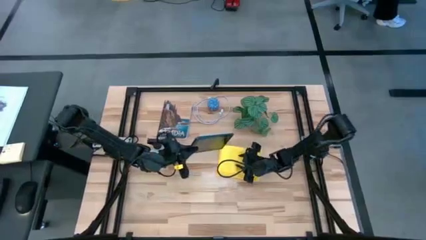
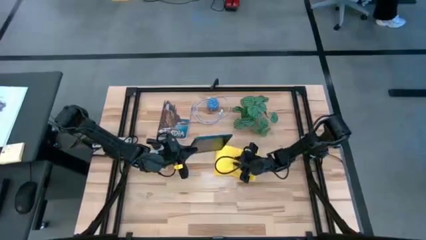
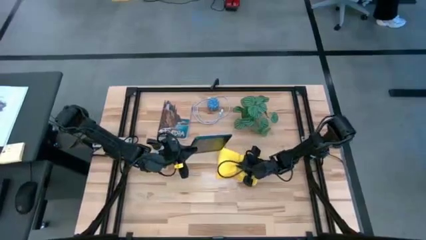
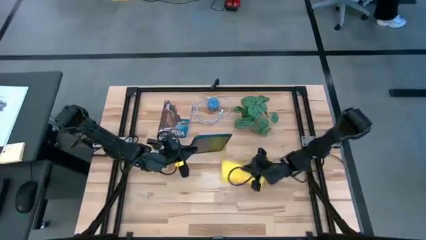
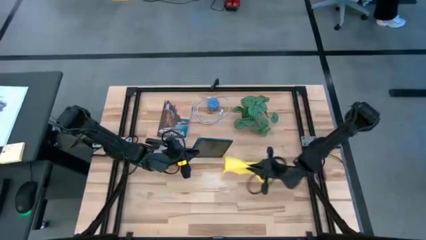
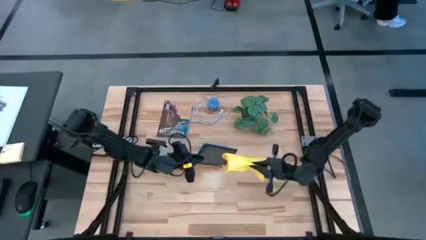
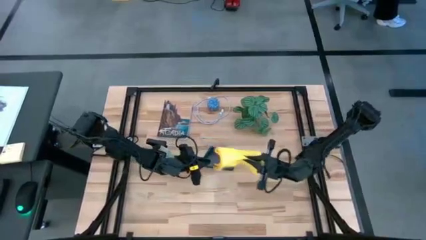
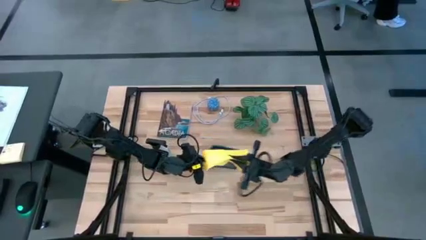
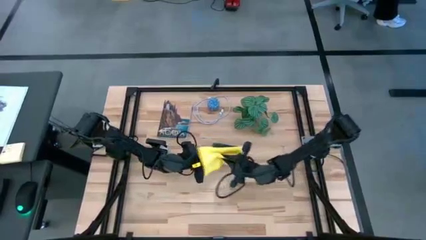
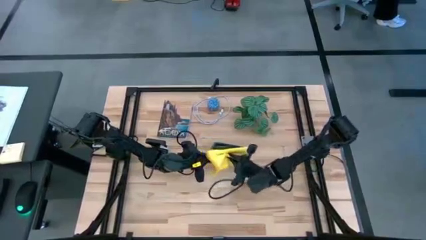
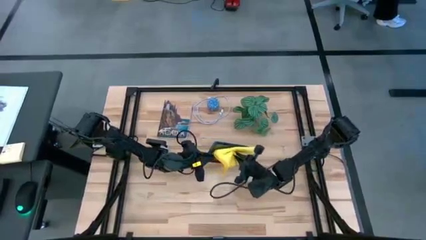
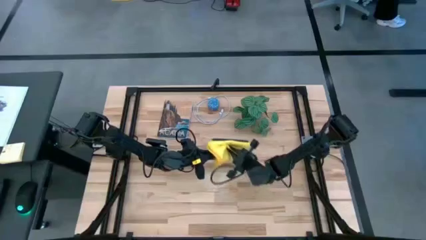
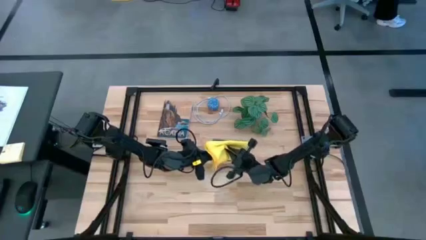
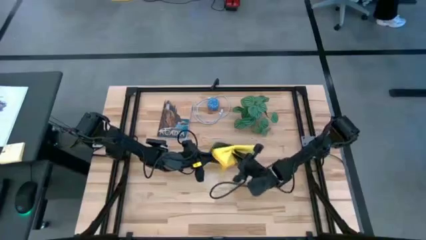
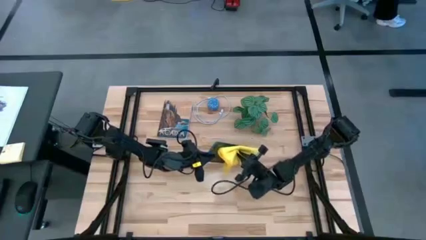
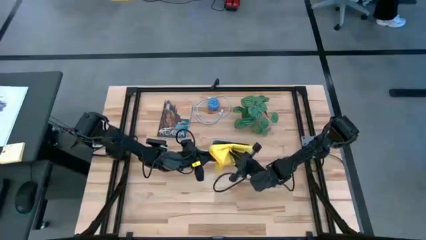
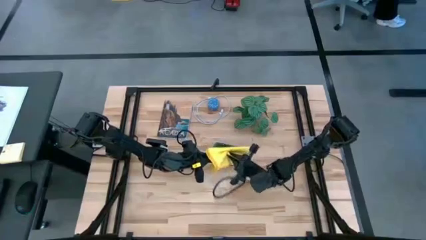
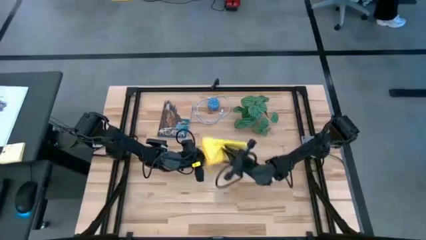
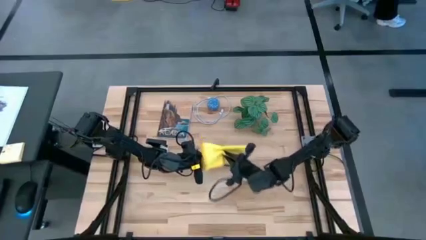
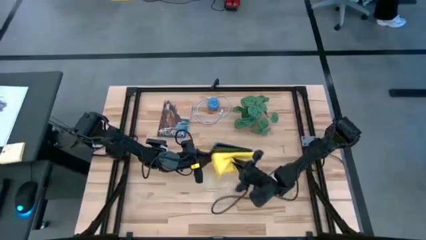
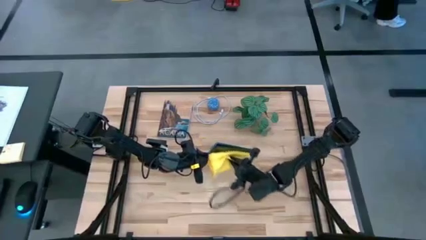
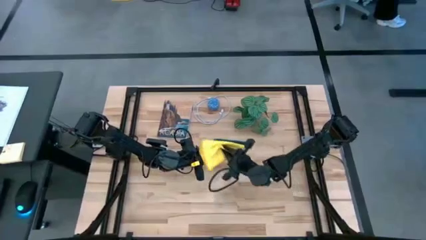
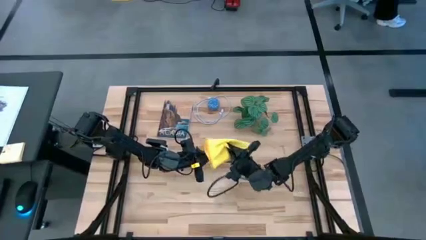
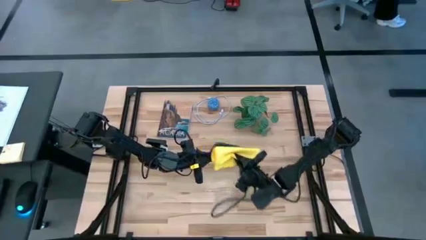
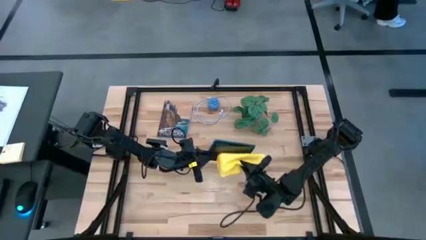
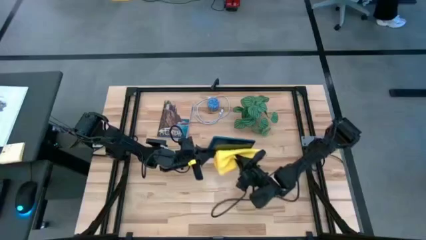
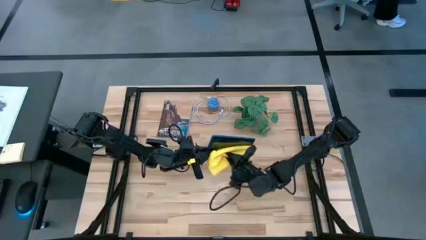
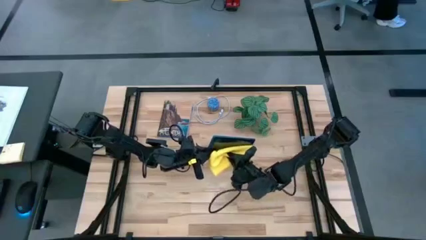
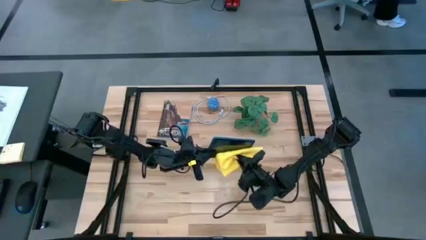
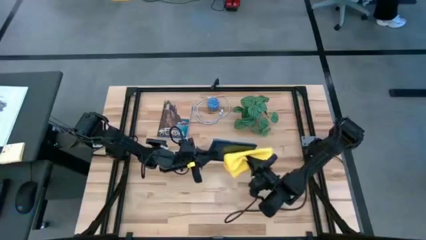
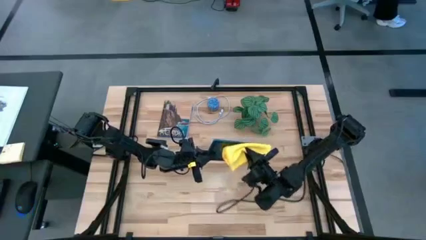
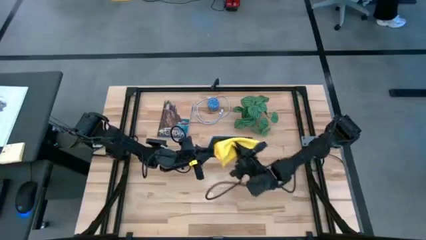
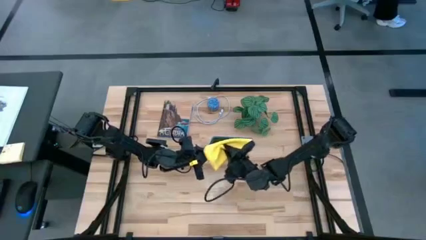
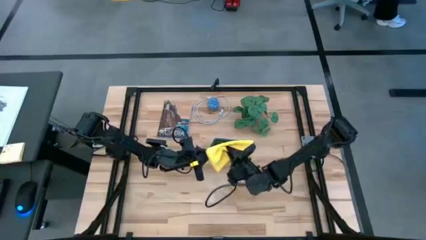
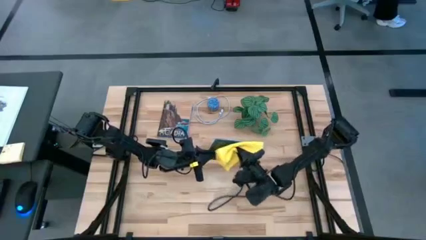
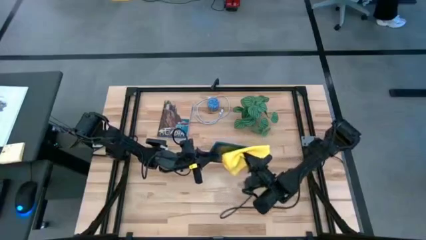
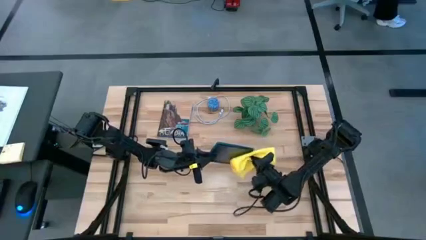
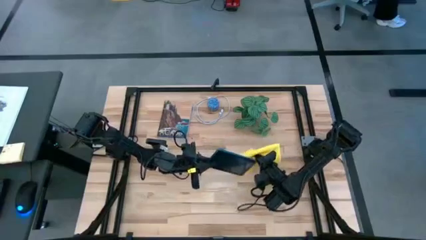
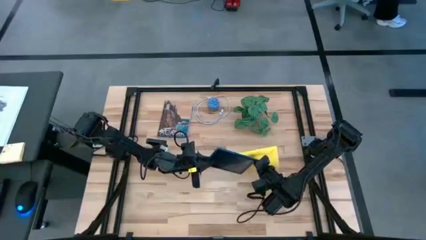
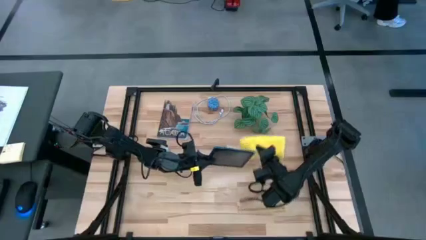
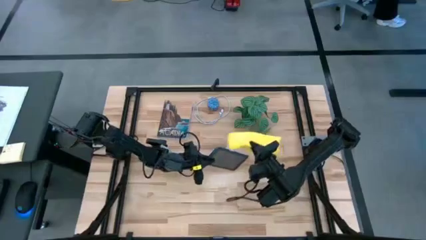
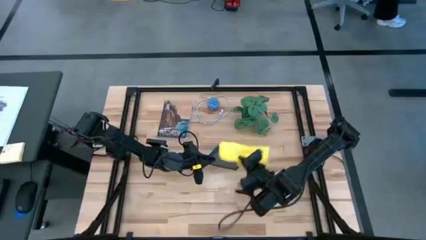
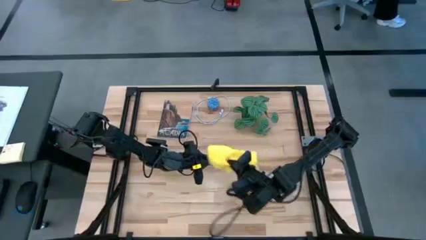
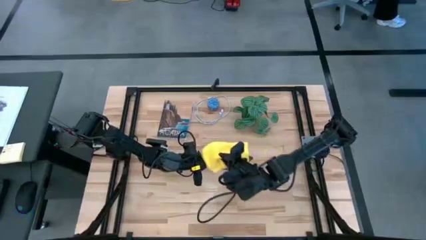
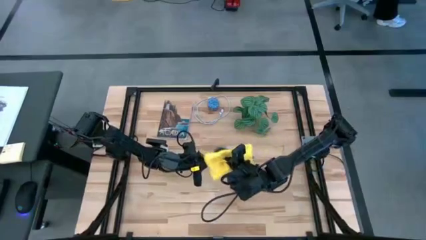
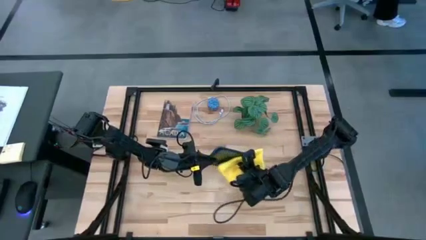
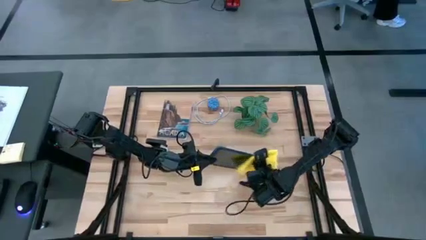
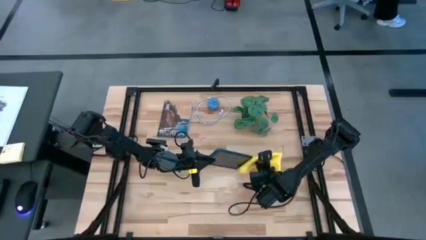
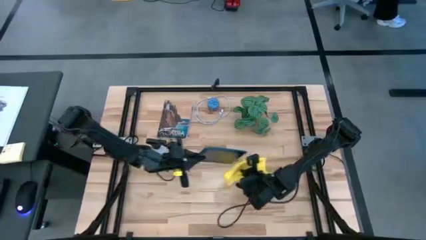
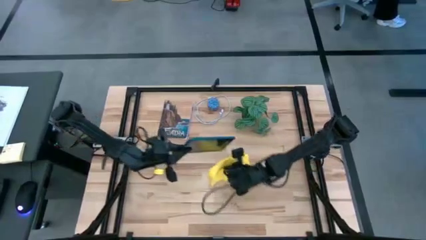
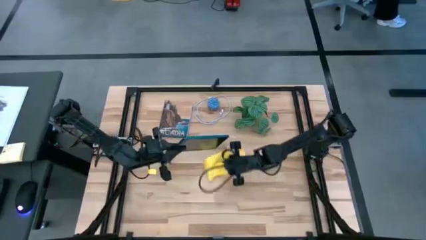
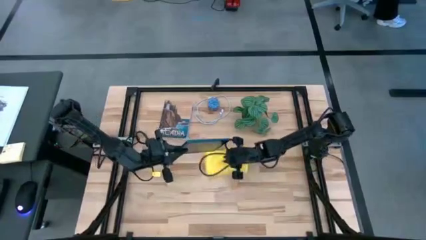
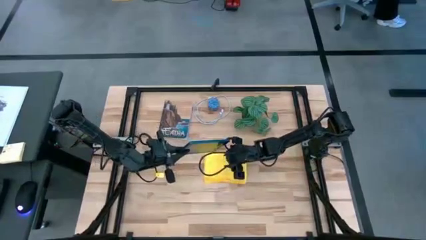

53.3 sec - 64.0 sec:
Task: Apply microfiber cloth
Wipe the blue tablet with the microfiber cloth
